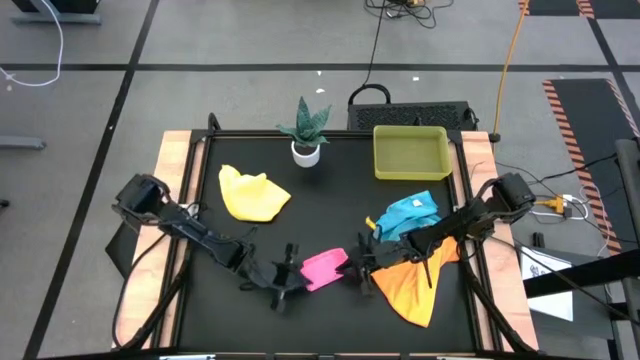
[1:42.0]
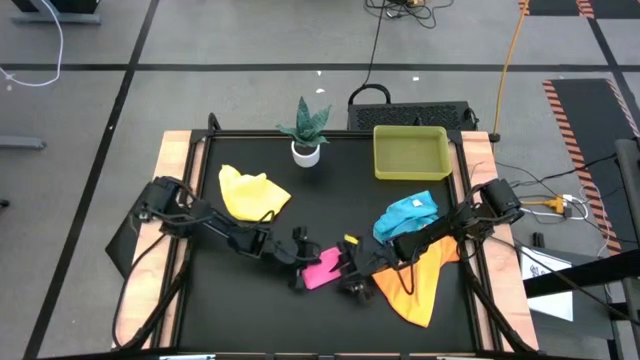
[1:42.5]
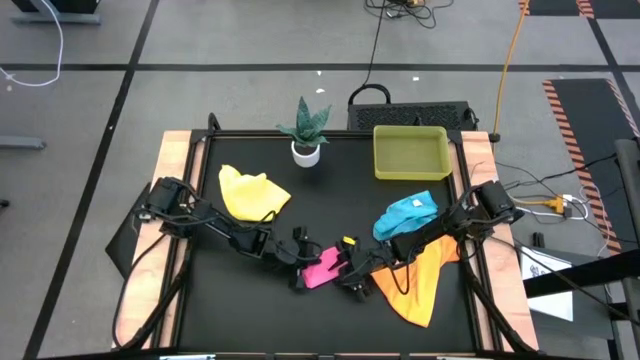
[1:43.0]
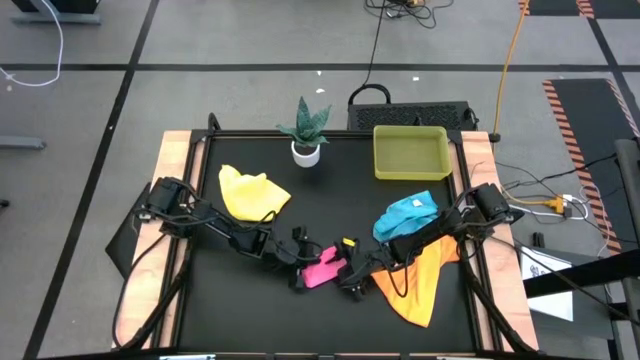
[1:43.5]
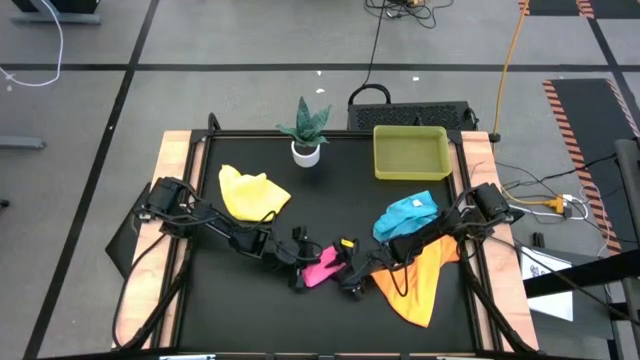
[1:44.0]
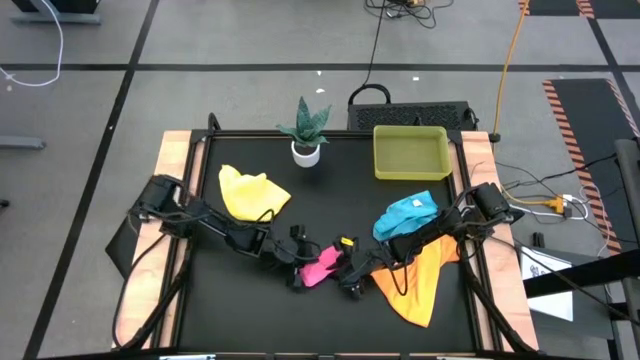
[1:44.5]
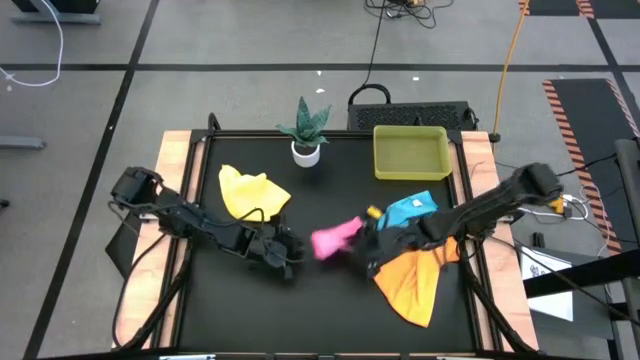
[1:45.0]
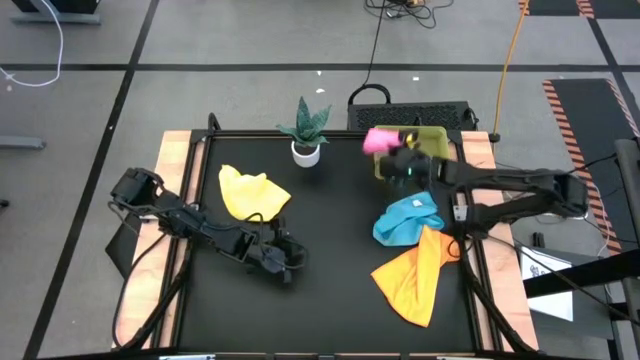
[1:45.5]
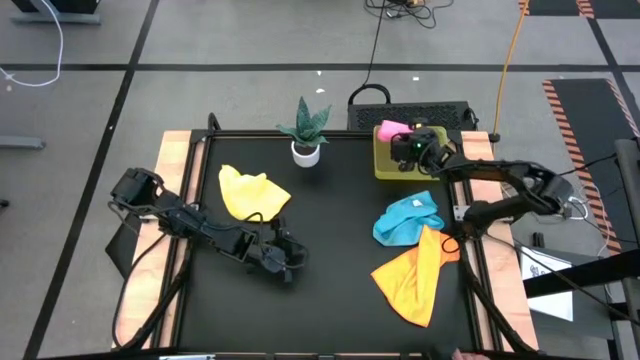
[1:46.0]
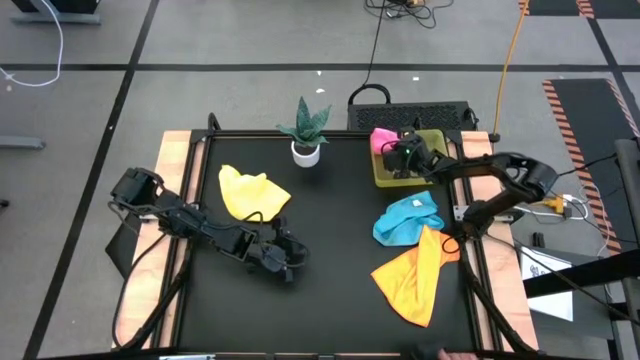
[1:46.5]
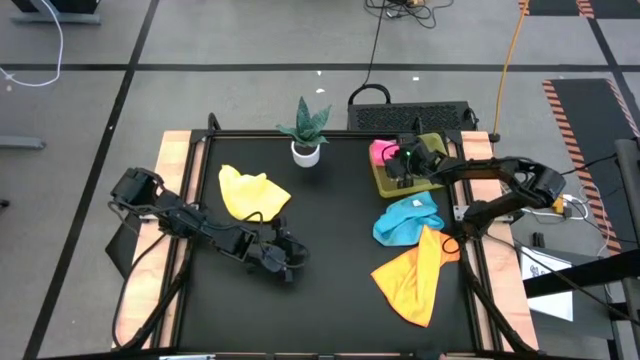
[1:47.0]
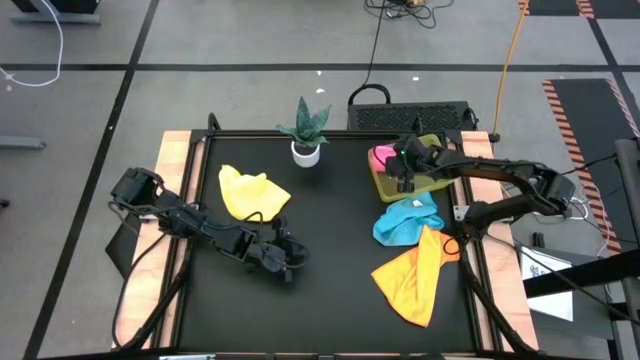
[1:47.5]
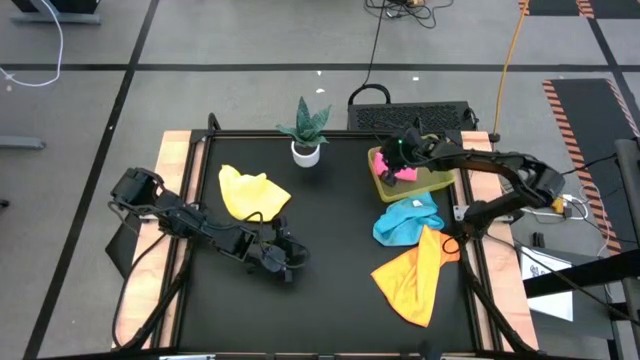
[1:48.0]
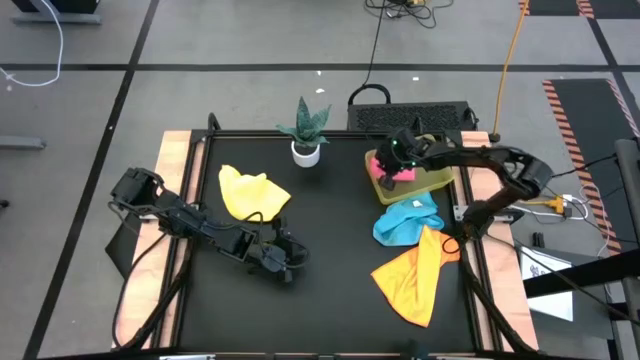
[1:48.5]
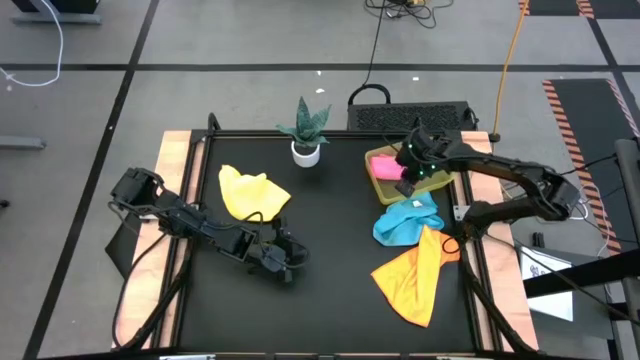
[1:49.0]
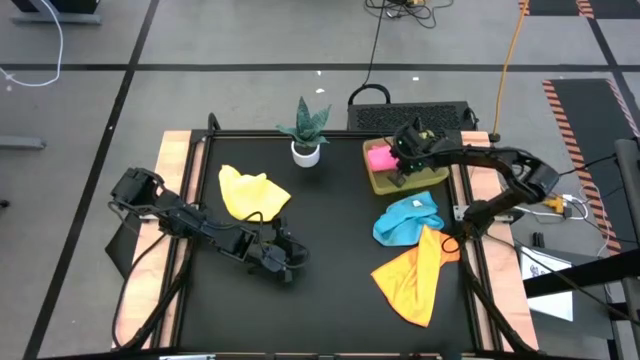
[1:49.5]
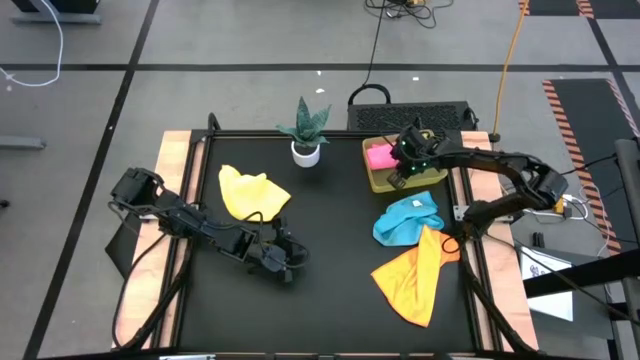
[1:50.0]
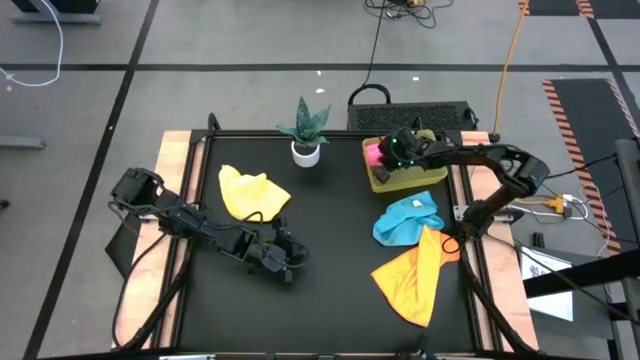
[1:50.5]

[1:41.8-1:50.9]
Task: Fold microfiber towels
Put the folded pink microfiber cloth into the yellow bin

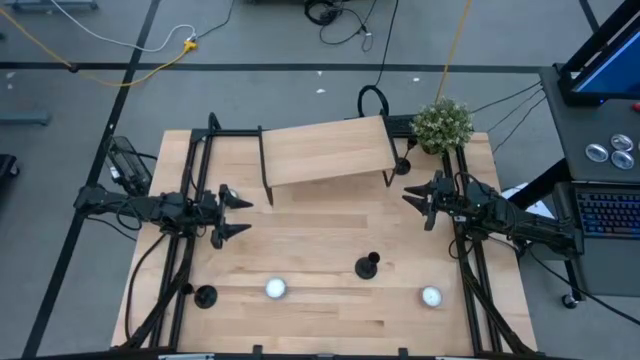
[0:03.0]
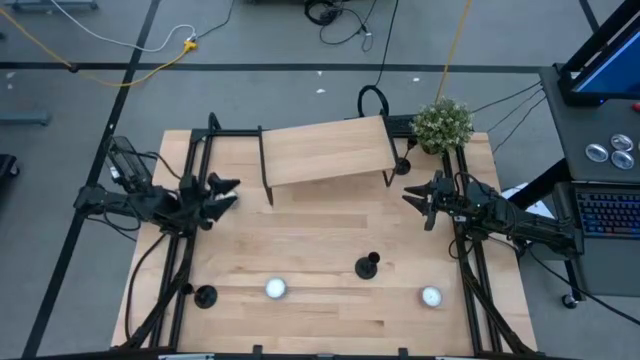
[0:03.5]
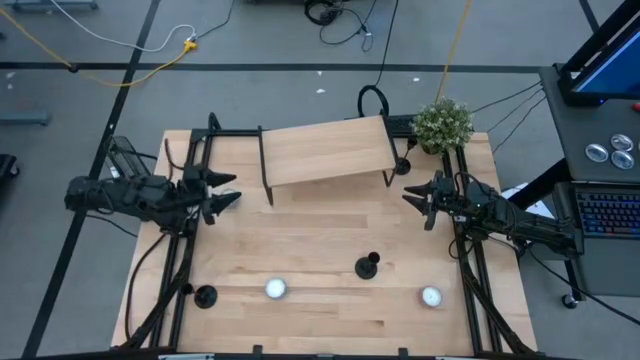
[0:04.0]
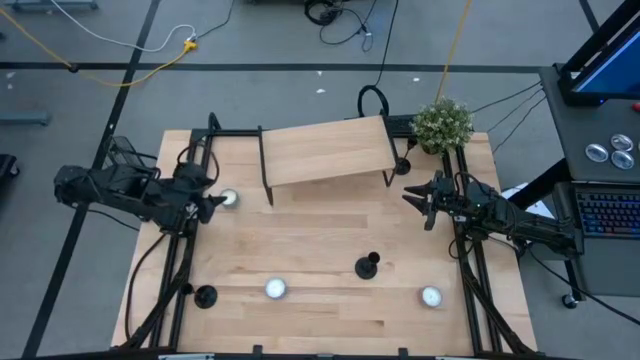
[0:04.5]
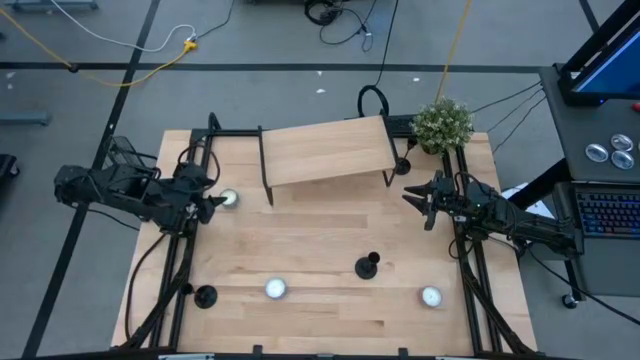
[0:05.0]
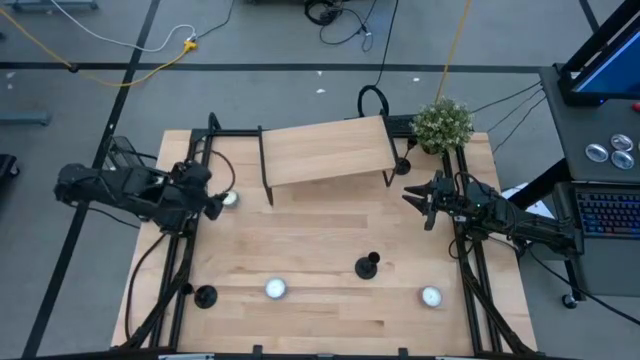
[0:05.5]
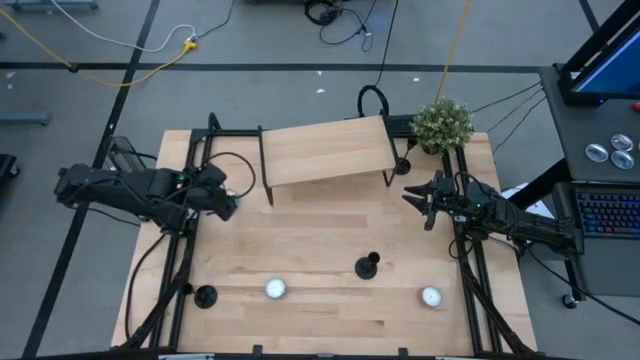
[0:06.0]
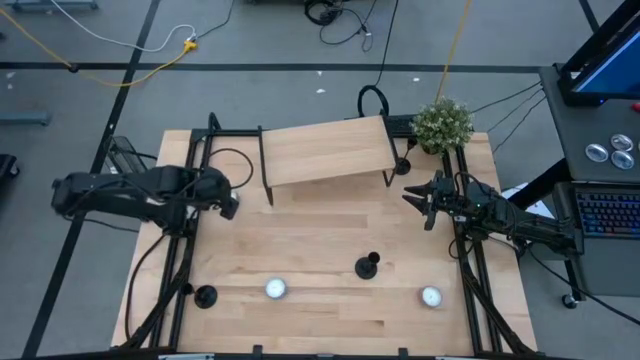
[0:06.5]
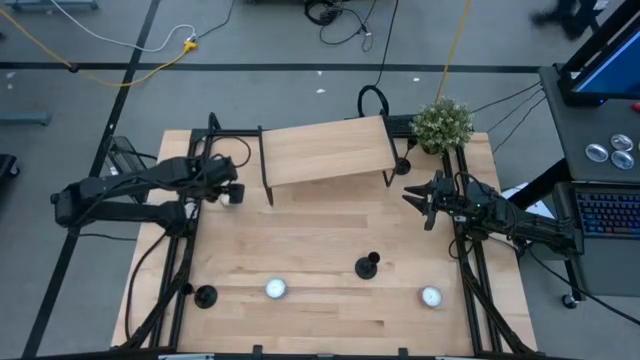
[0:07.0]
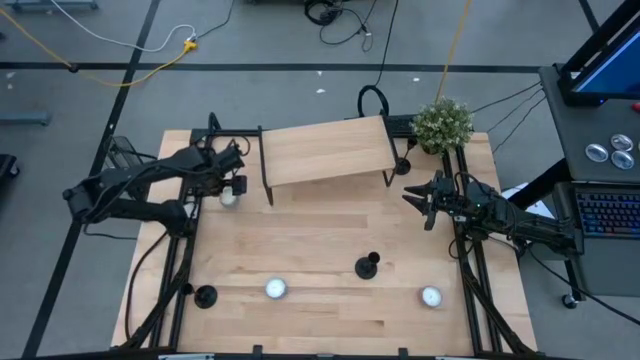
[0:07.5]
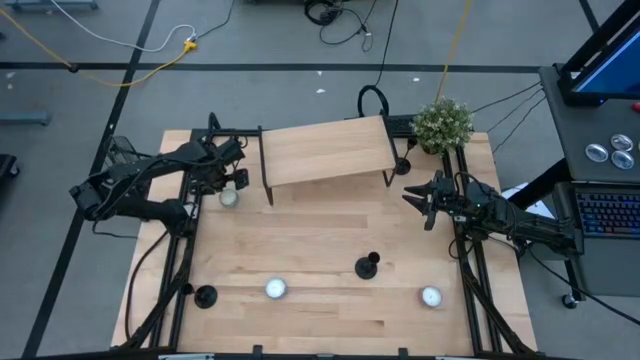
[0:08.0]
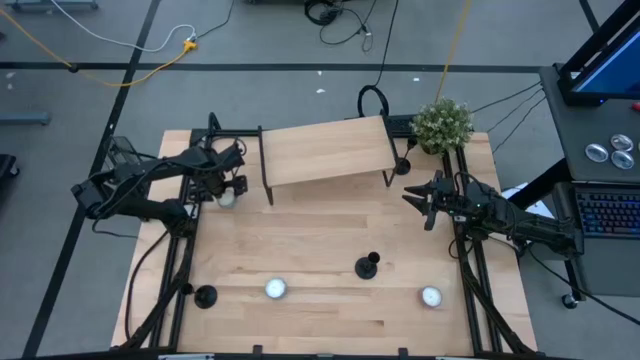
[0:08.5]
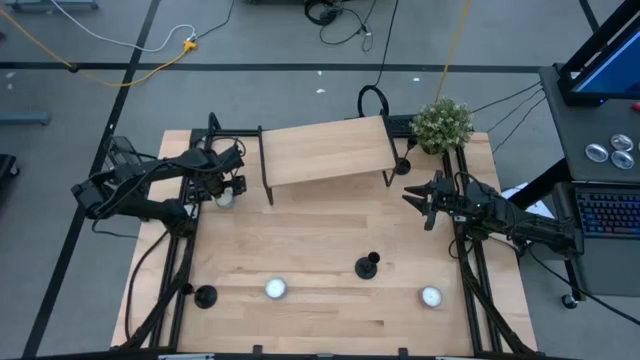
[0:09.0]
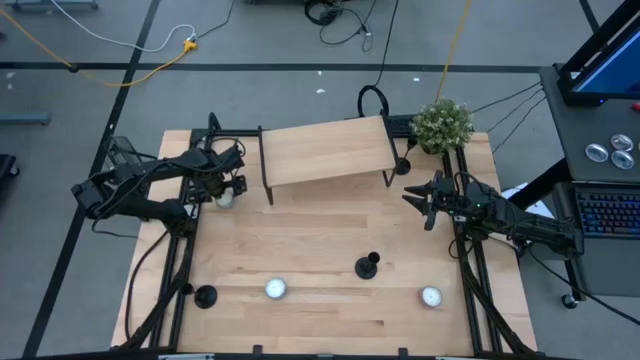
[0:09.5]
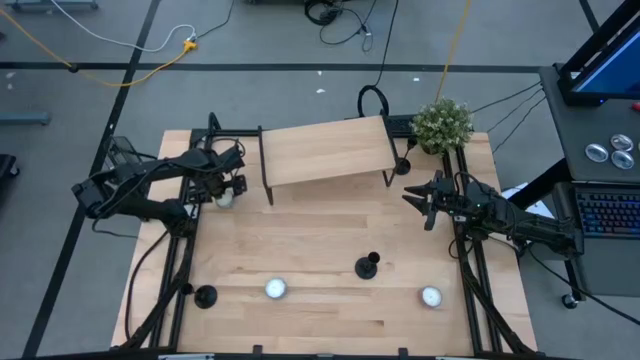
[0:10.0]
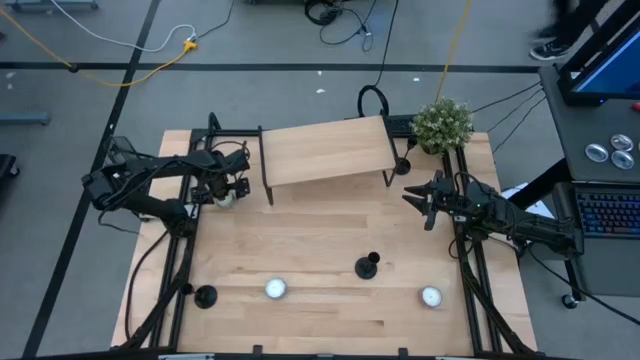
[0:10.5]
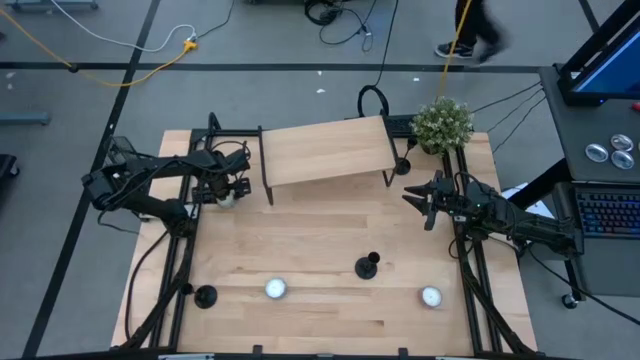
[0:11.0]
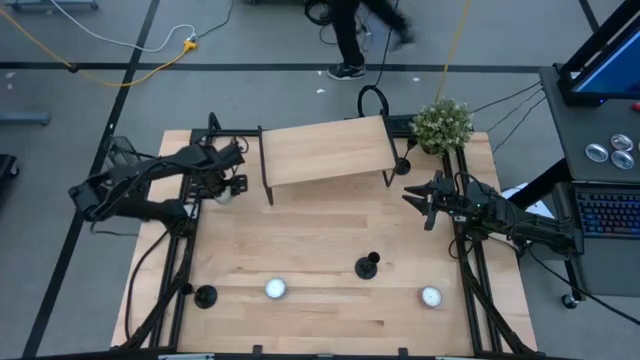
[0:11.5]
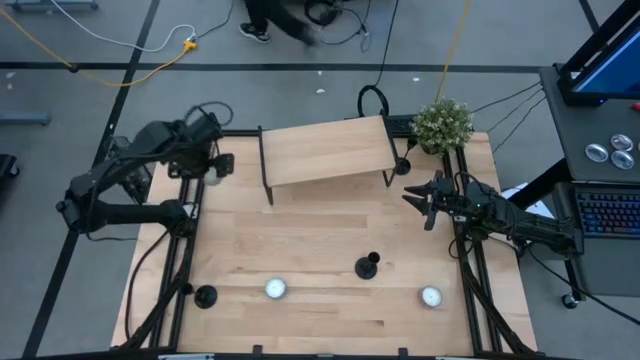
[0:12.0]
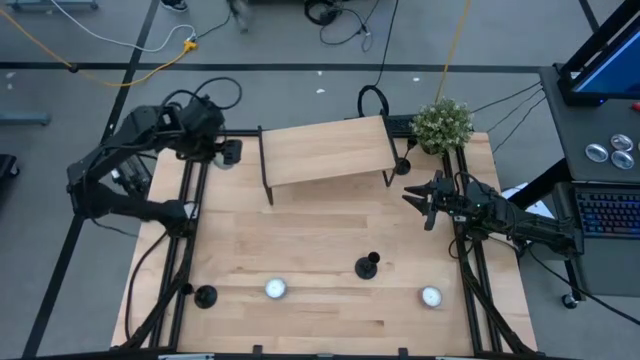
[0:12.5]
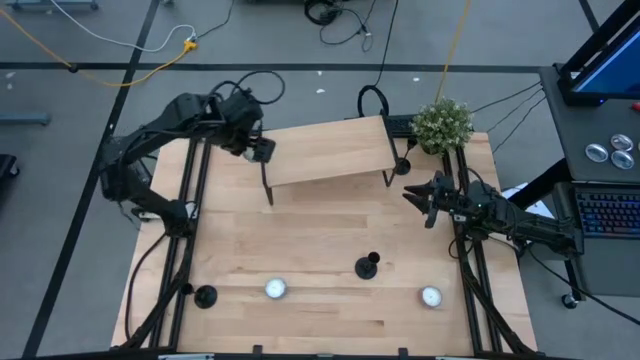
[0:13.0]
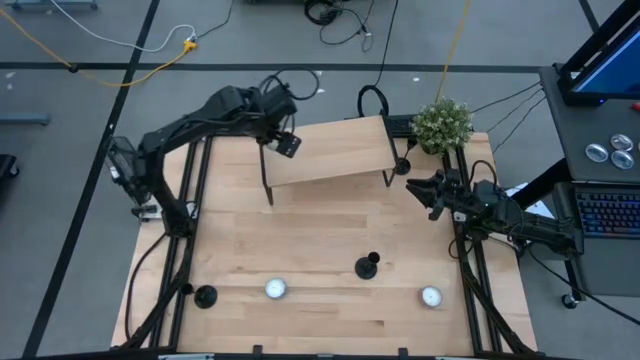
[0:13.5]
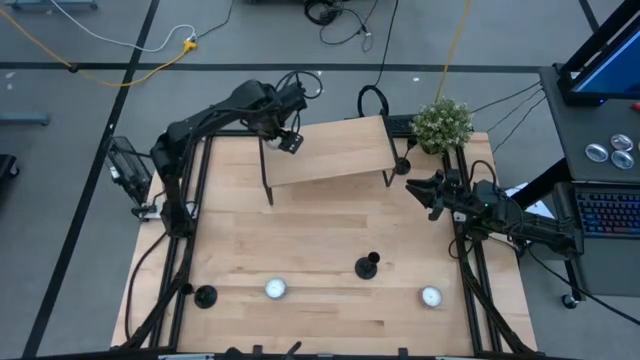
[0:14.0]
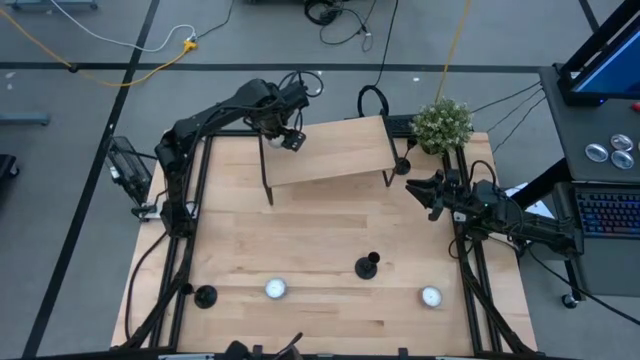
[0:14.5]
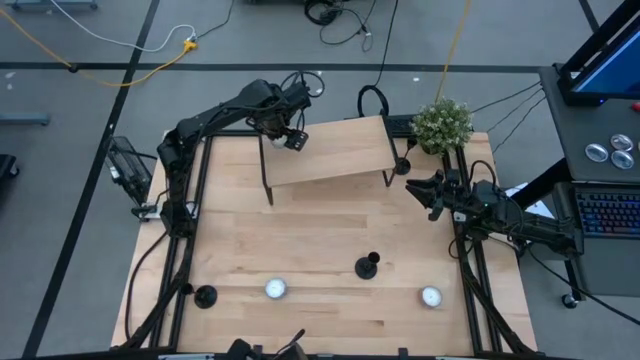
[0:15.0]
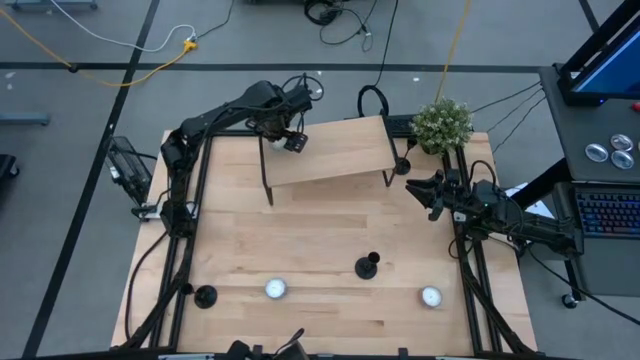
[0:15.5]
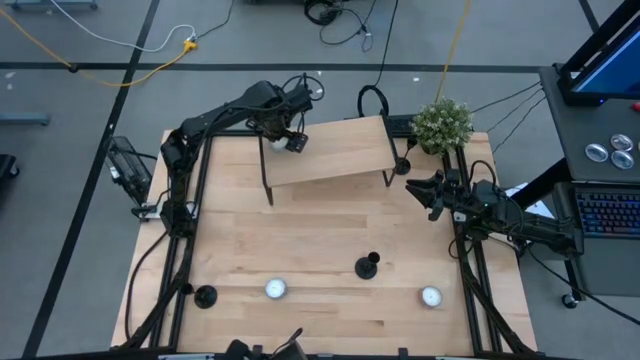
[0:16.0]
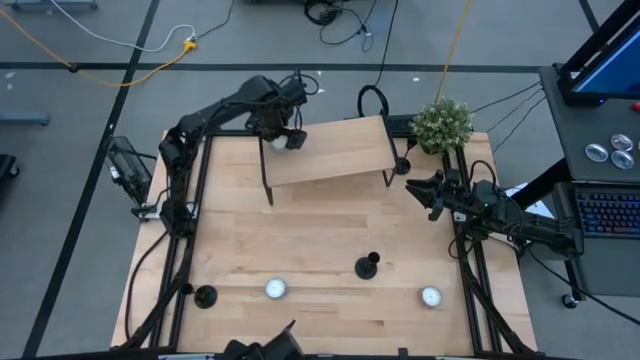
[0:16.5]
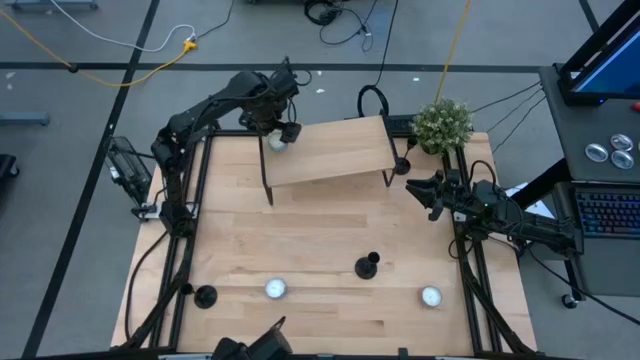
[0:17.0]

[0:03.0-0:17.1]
Task: Pick & Place candle stick holders
Put the blue patterned scented candle on the shelf
